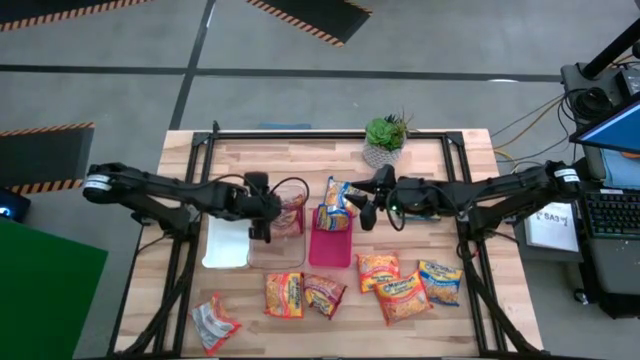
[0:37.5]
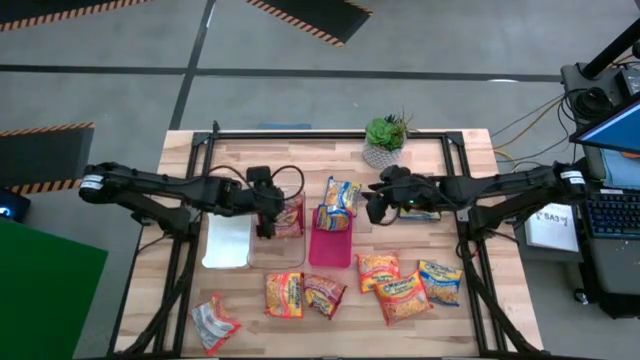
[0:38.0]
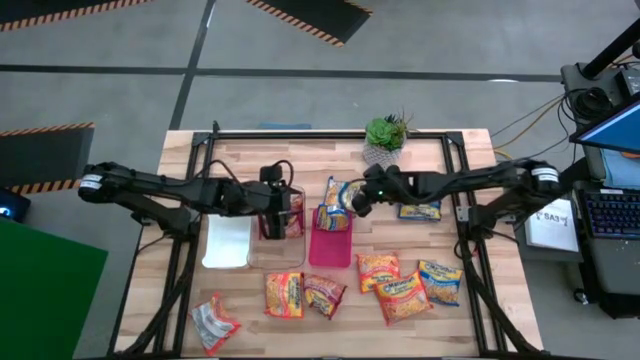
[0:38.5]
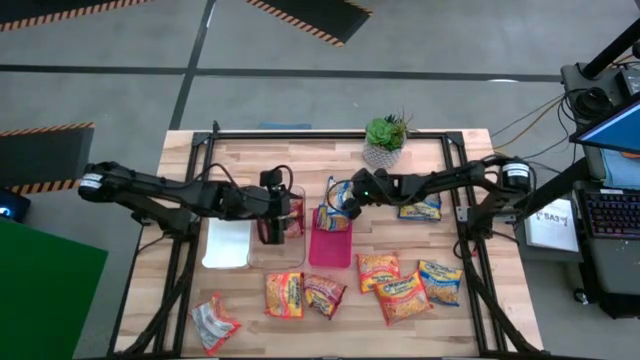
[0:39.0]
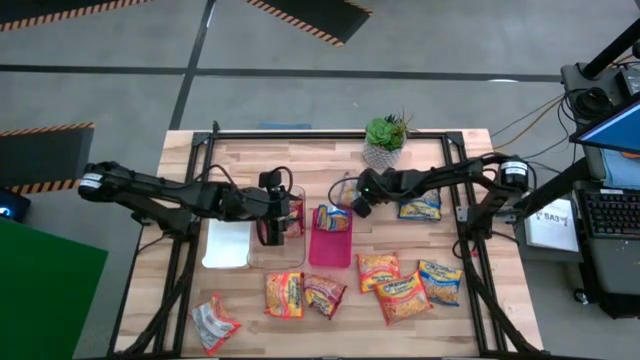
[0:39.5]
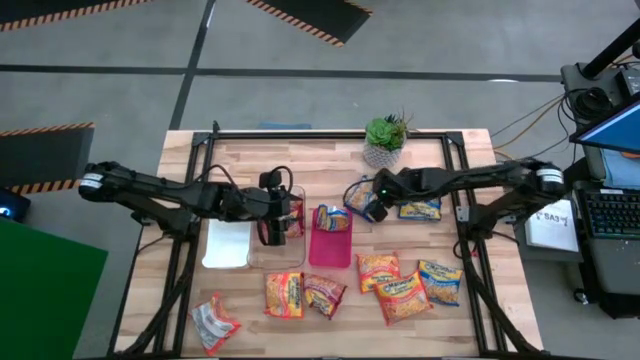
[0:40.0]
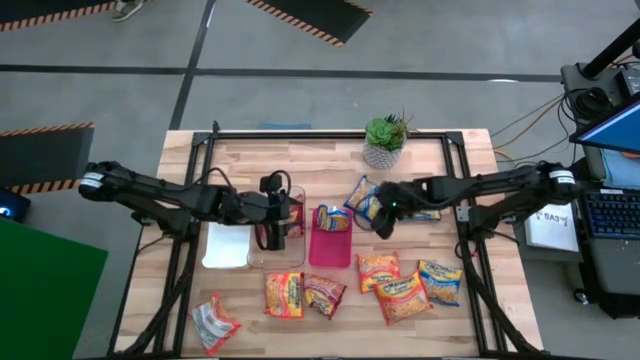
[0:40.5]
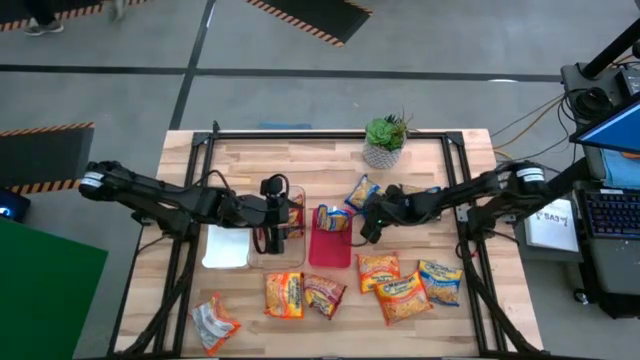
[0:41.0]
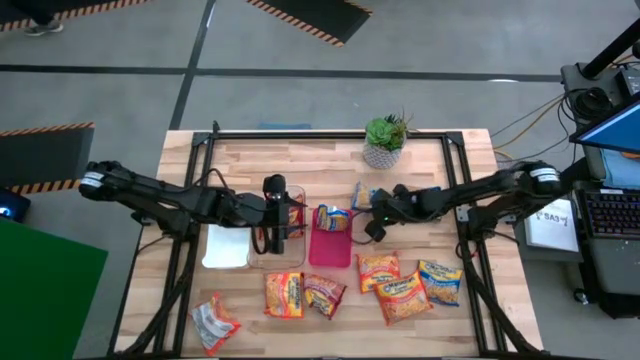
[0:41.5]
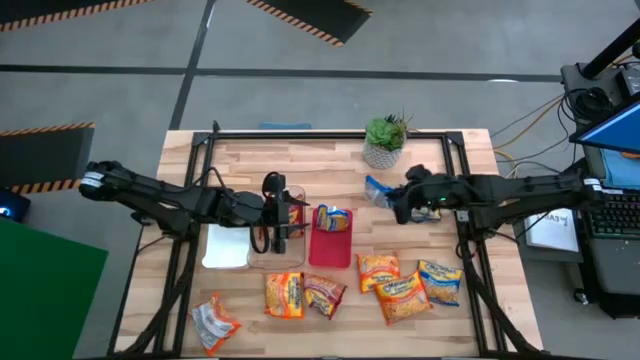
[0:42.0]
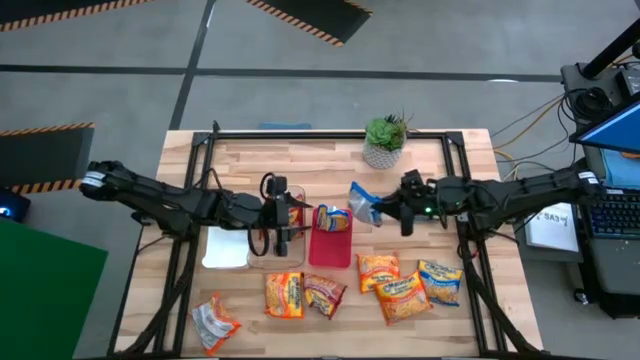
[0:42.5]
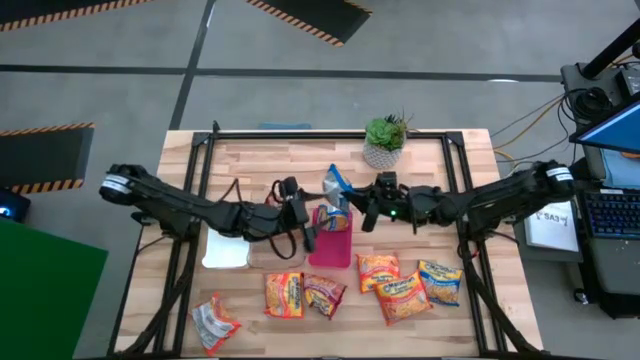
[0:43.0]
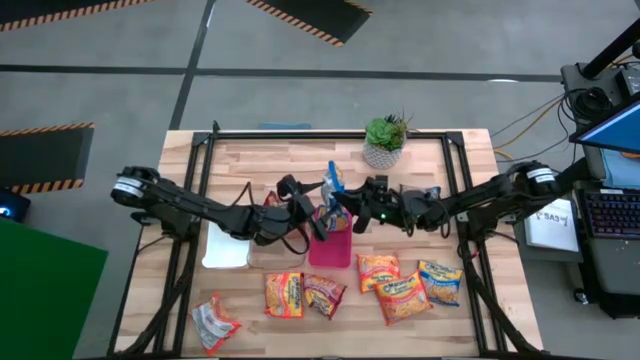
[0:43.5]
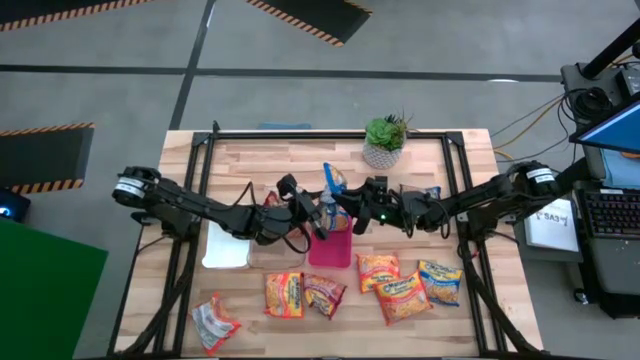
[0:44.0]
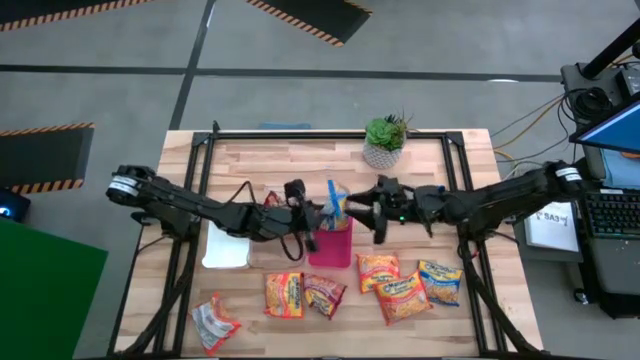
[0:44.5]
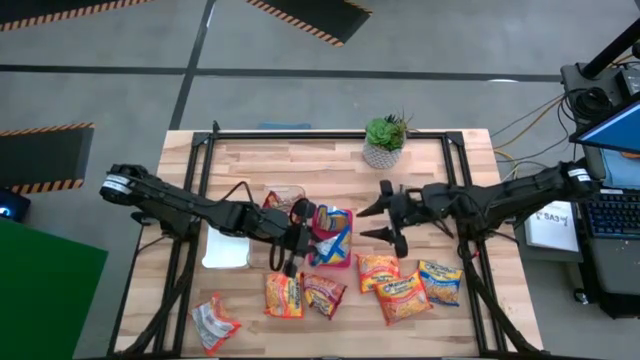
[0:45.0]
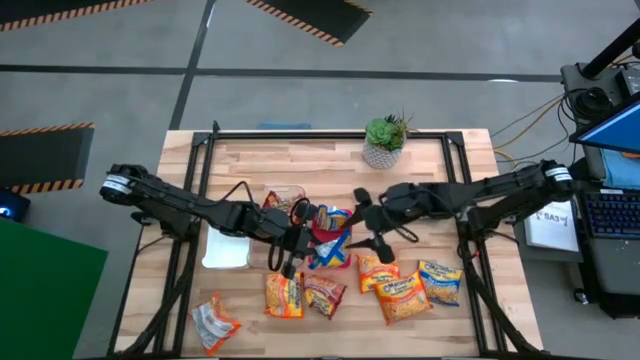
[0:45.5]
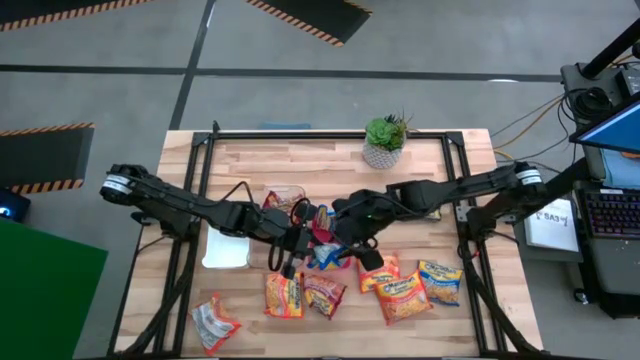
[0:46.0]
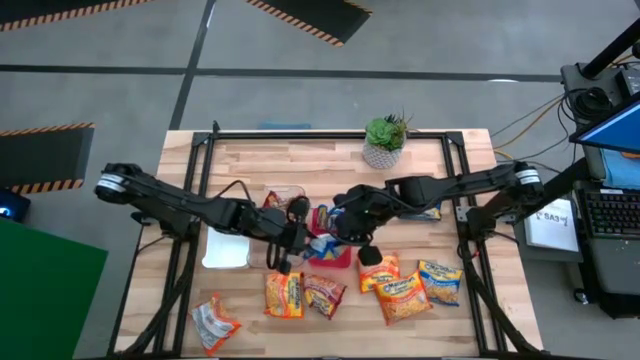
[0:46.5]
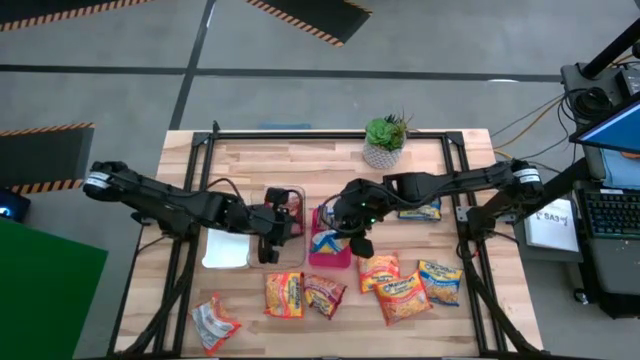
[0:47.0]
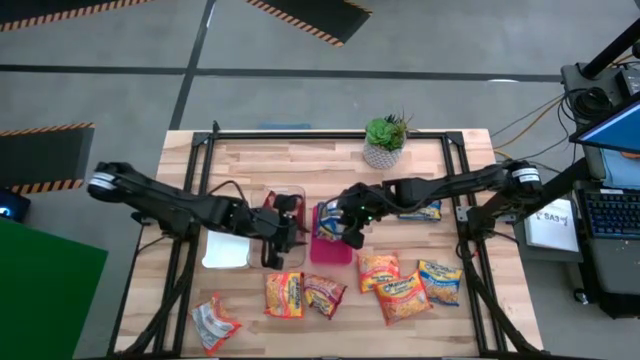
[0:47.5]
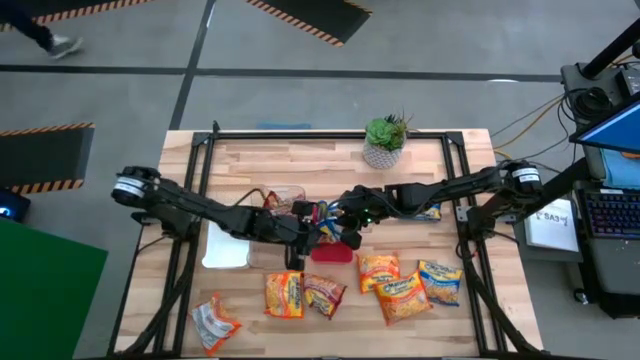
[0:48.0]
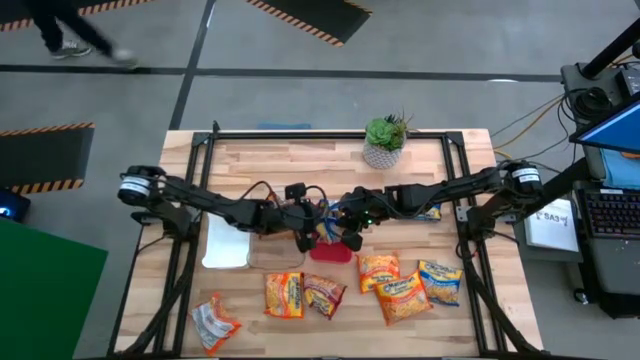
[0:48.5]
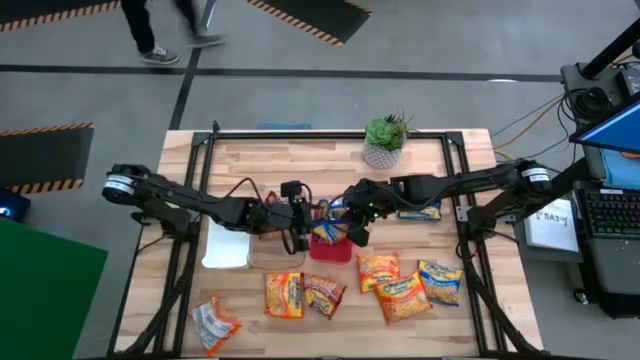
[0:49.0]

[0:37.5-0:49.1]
Task: Sort Maruchan noodles
Put the blue noodle pack into the red bin

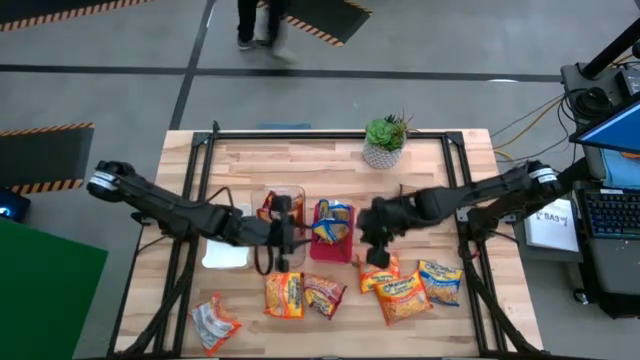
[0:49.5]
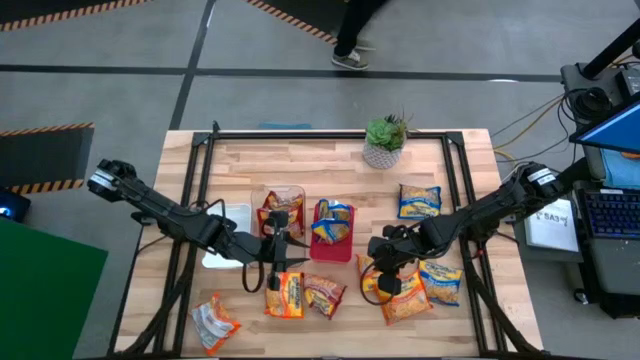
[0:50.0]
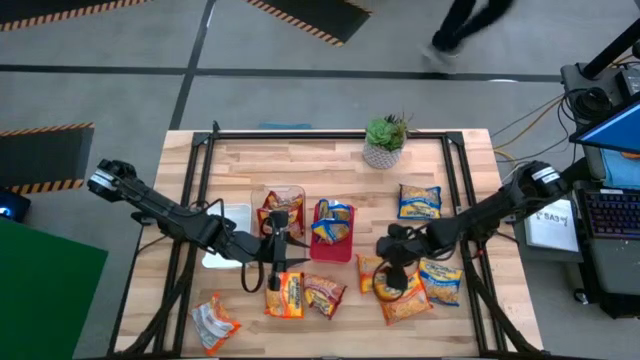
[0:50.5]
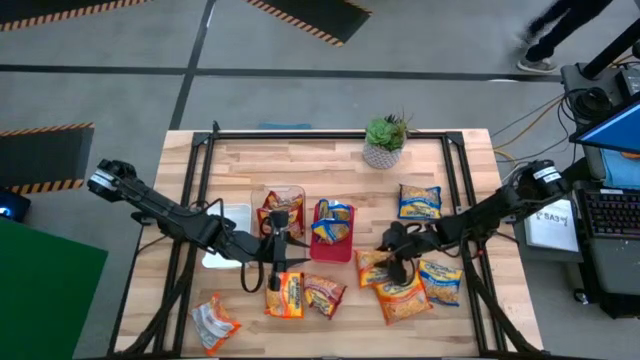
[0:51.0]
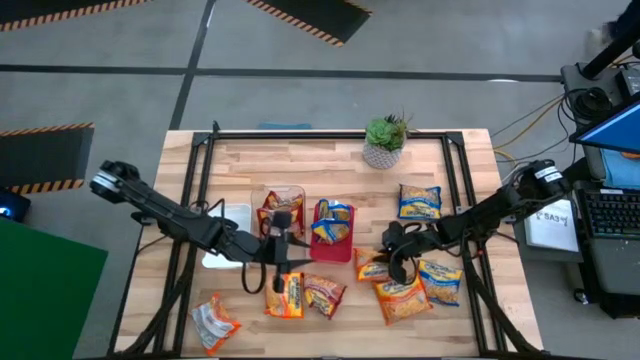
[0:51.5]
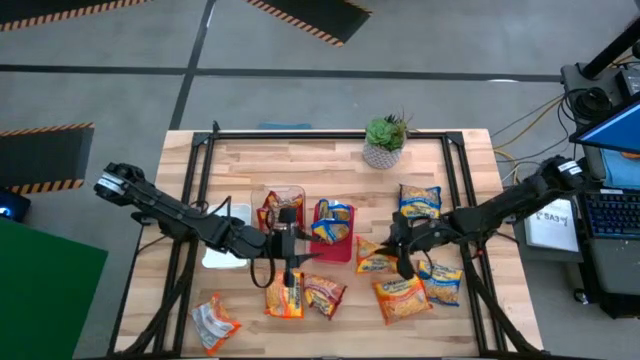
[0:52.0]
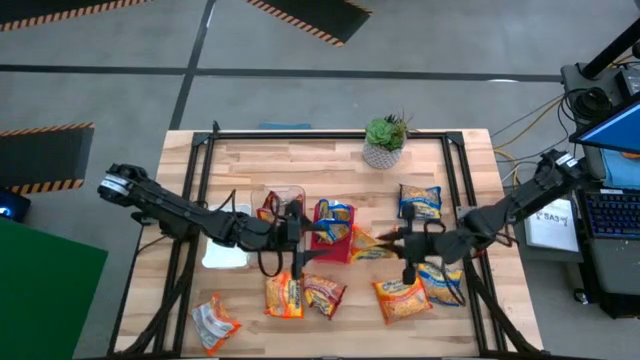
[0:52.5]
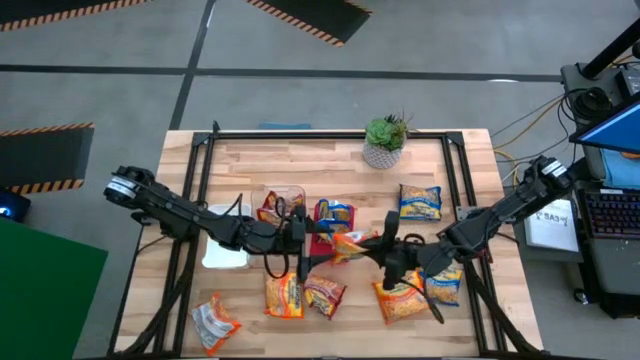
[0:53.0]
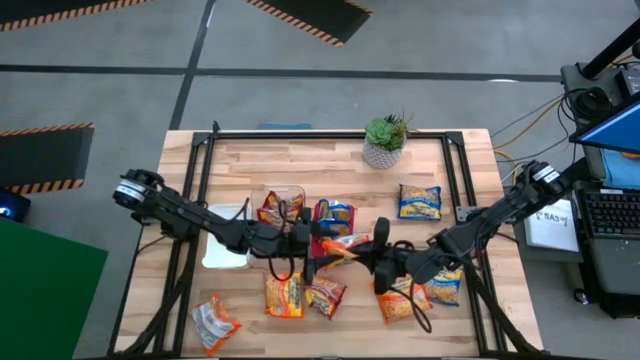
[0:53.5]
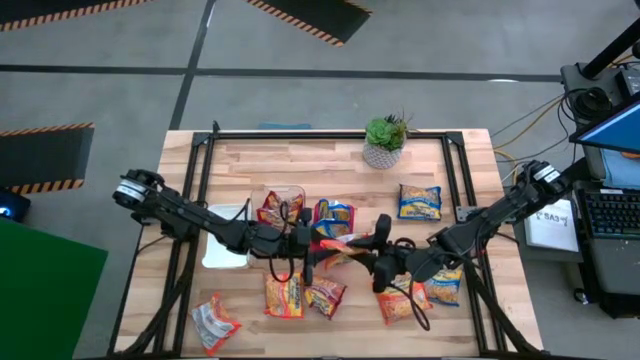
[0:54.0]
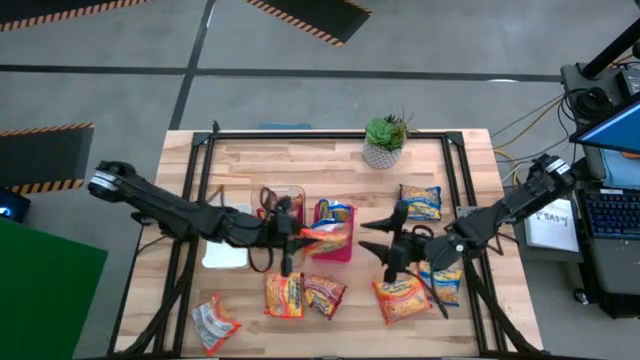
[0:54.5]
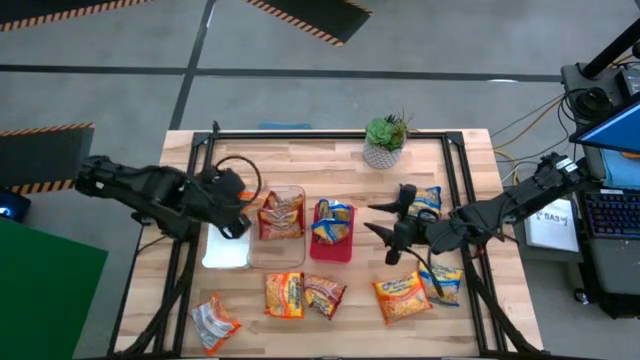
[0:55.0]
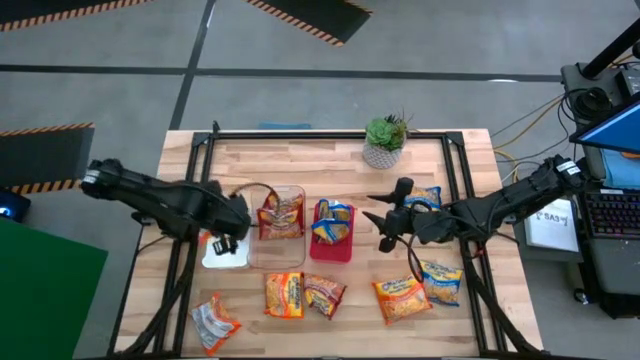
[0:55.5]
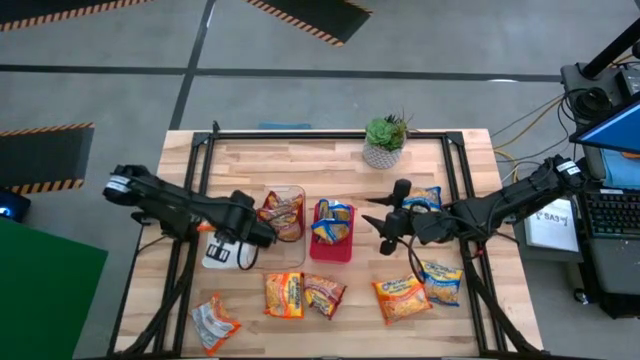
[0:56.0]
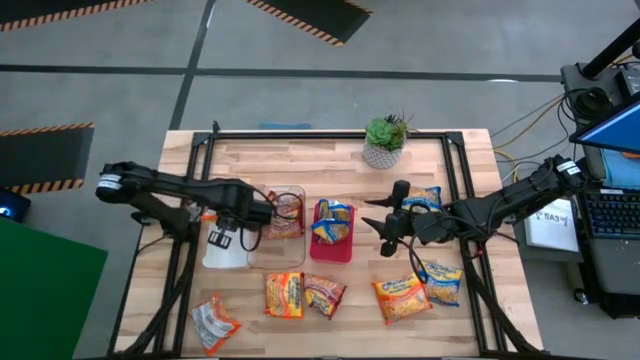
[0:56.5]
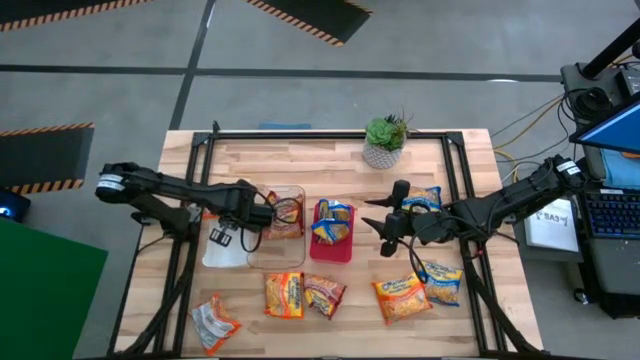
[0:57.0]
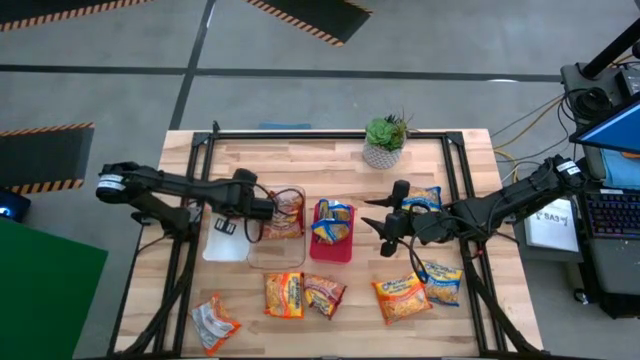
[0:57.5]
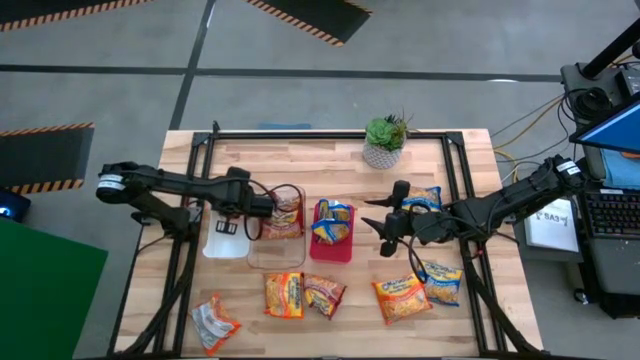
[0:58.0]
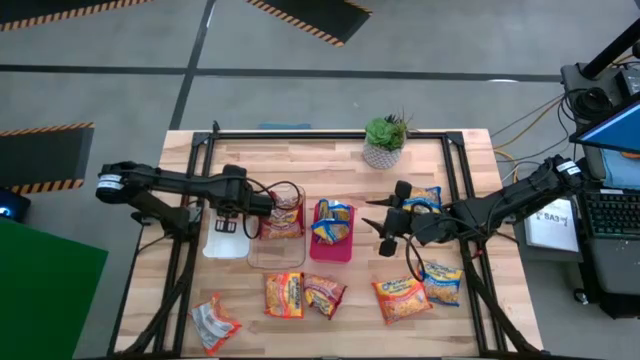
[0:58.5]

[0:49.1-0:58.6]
Put the orange noodle pack into the white bin
